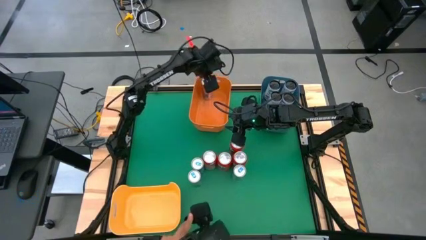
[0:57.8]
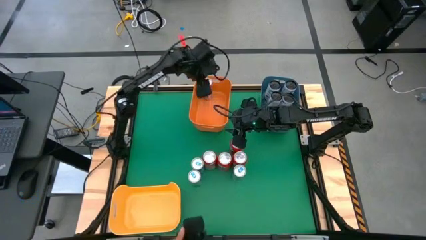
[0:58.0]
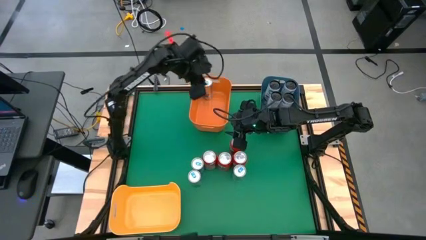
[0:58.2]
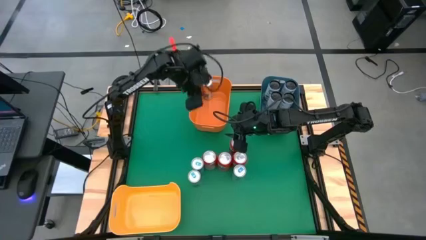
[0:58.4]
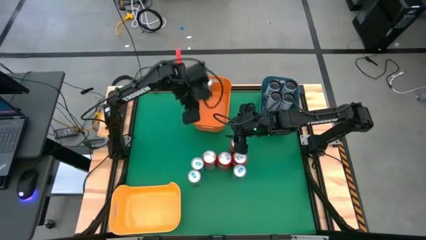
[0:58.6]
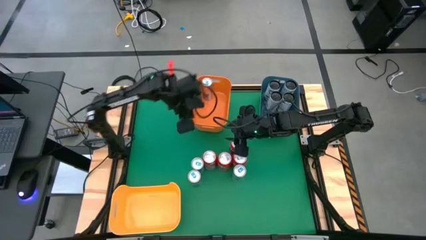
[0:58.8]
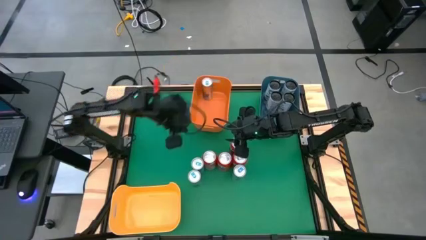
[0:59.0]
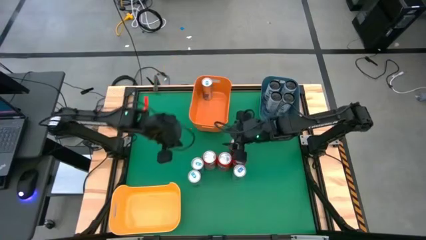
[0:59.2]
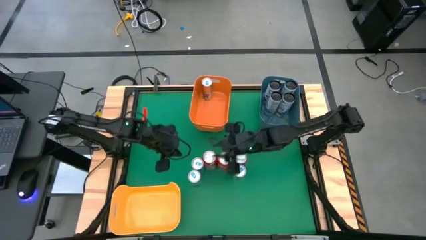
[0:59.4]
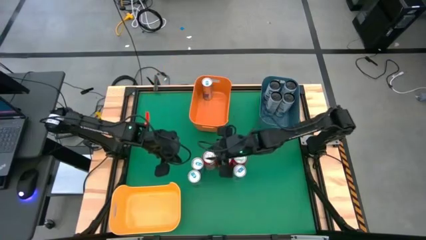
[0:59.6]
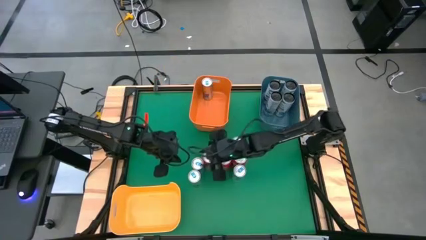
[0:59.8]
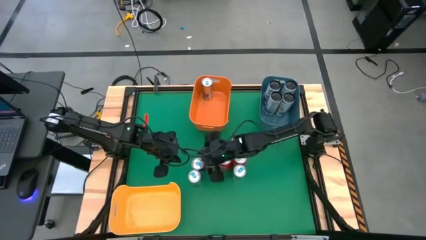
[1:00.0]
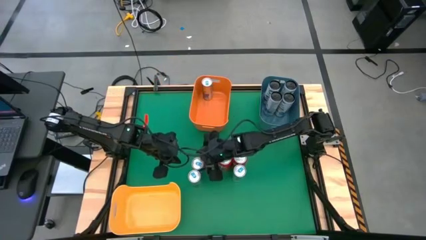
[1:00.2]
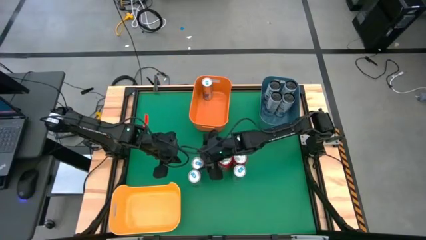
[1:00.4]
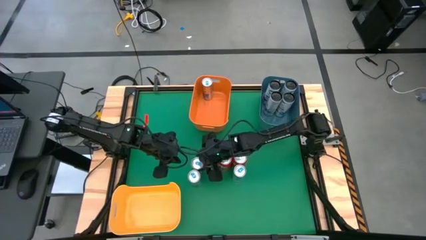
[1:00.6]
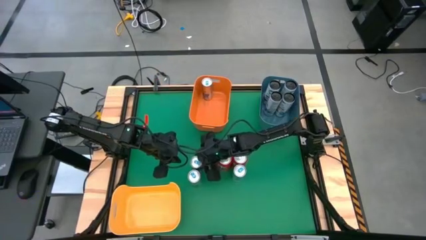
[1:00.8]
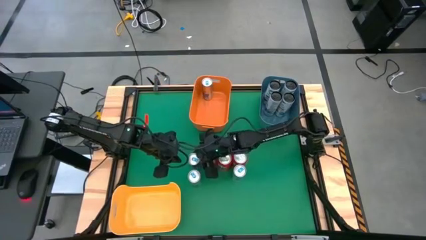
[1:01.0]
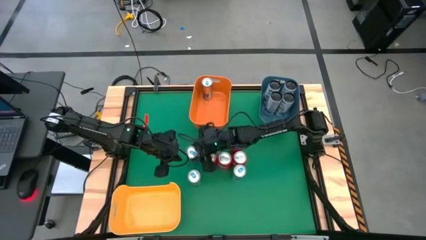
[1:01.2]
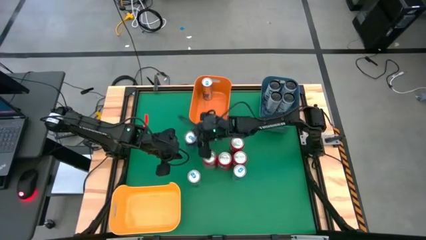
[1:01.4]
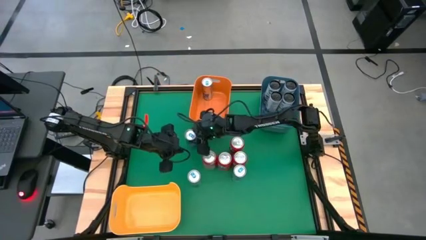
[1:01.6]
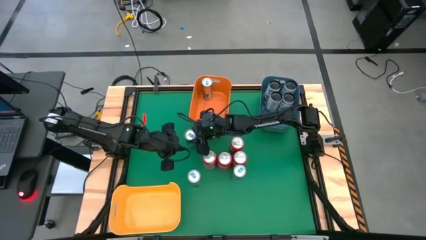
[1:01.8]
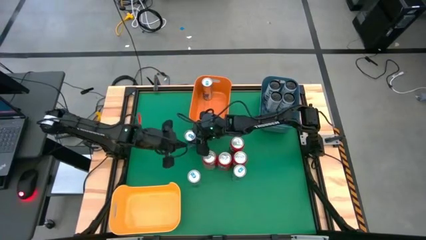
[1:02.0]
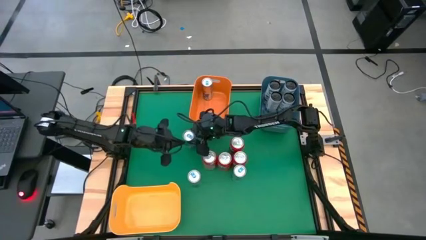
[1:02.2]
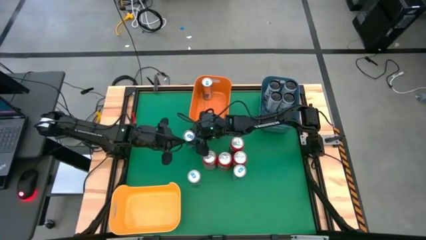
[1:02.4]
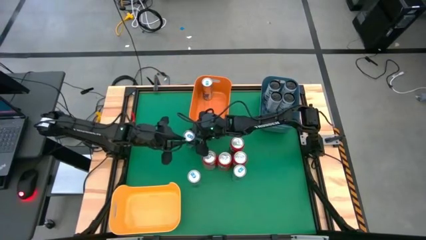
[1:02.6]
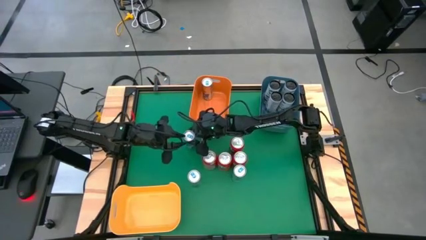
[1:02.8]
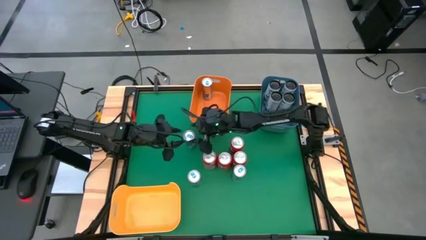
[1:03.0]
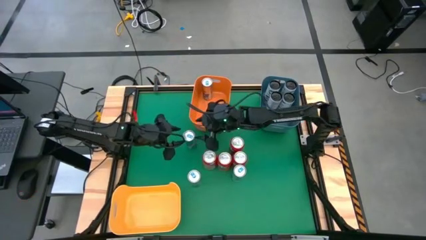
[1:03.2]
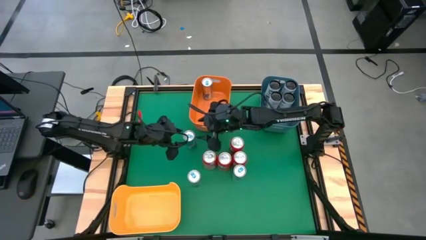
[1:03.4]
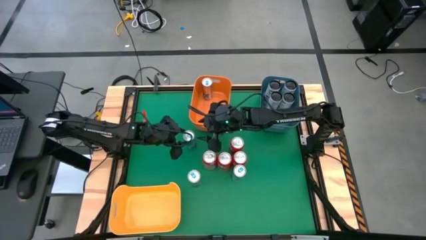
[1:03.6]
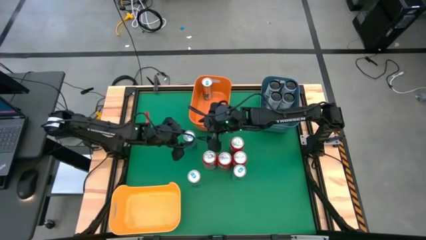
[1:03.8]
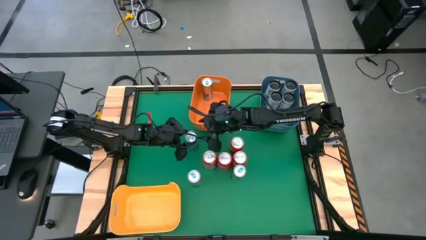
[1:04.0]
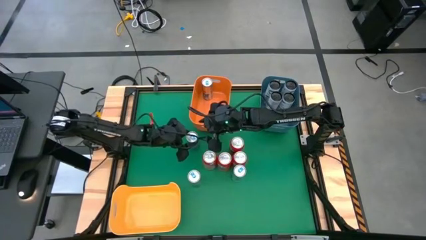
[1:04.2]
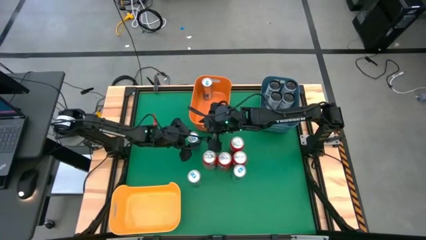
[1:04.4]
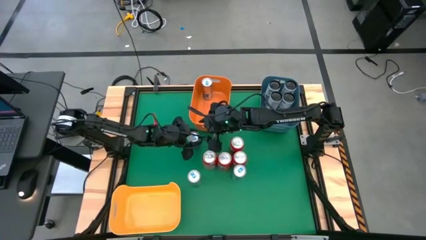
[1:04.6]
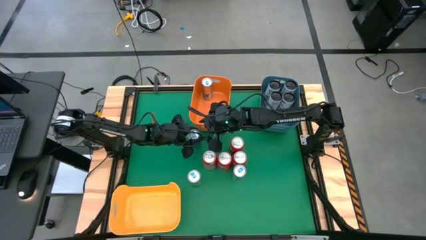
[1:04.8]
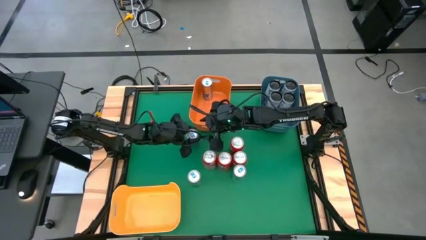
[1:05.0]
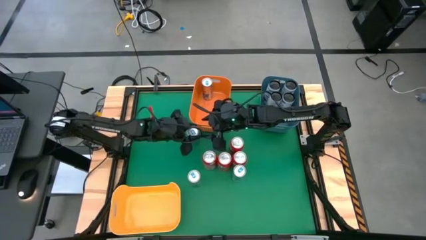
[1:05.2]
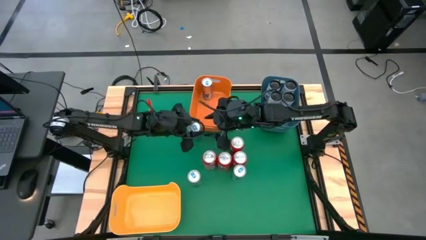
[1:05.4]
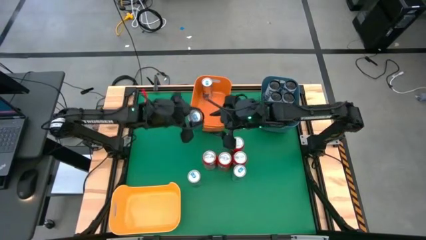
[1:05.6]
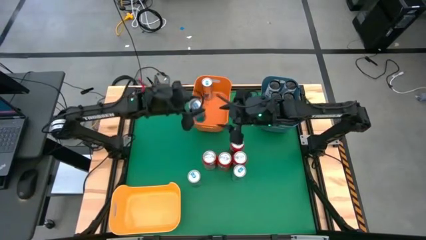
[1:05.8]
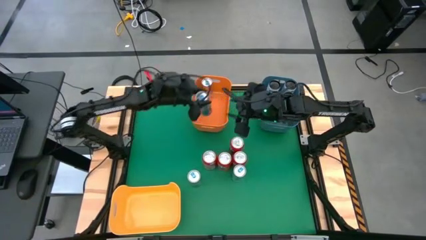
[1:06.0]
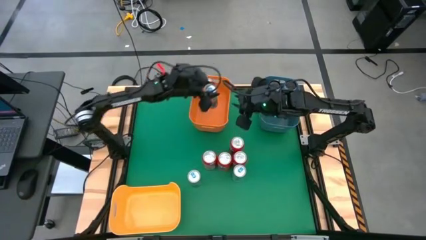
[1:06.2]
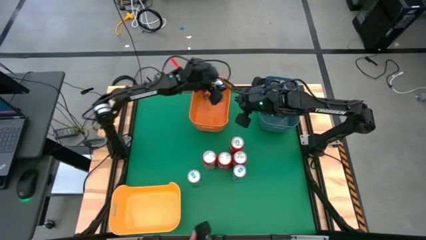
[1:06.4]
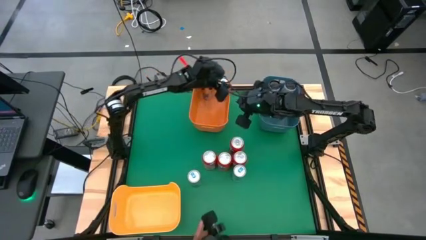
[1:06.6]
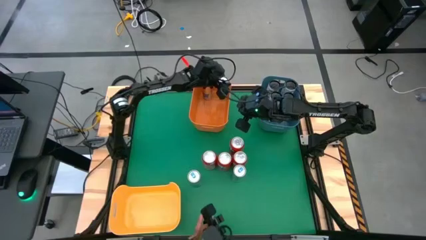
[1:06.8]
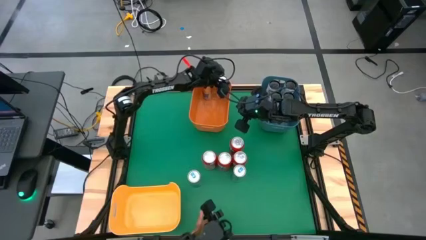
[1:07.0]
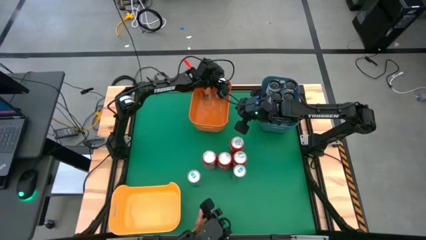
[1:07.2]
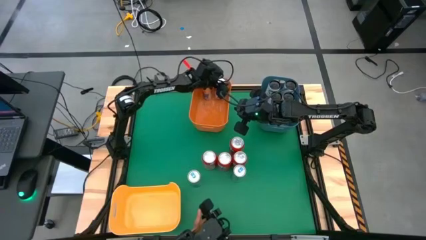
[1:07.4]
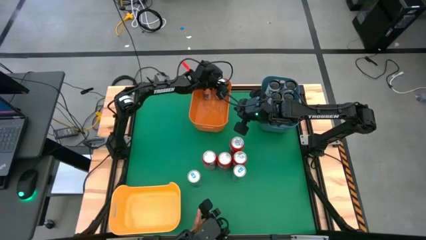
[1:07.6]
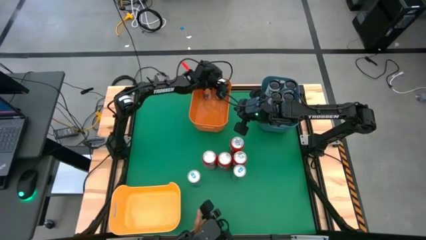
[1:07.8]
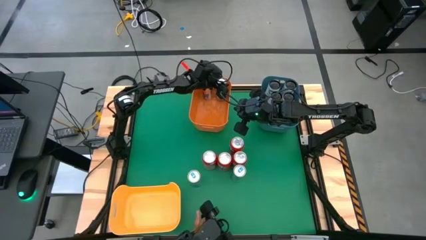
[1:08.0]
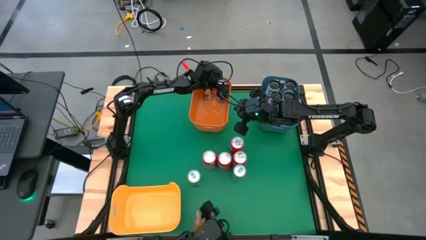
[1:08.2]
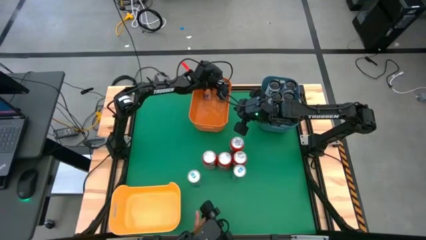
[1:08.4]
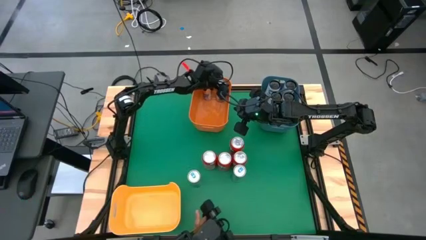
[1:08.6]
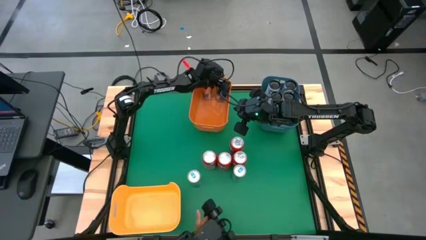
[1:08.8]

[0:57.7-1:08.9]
Task: Sort soda cans
Put the blue soda can into the orange bin

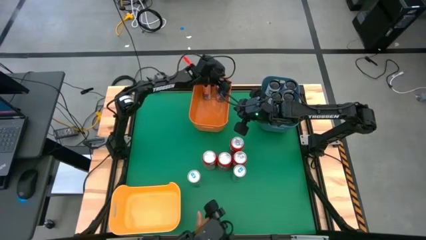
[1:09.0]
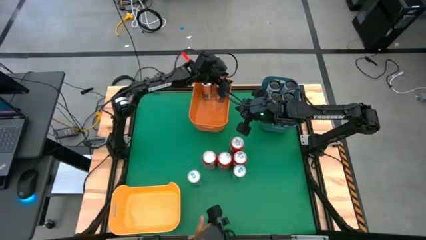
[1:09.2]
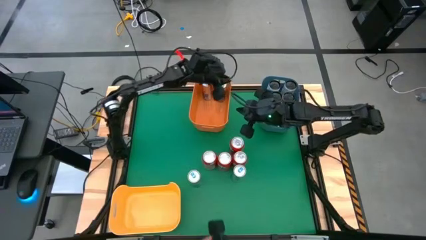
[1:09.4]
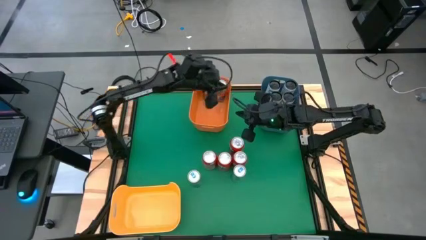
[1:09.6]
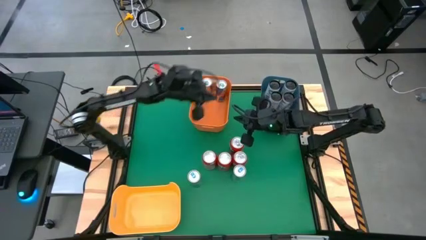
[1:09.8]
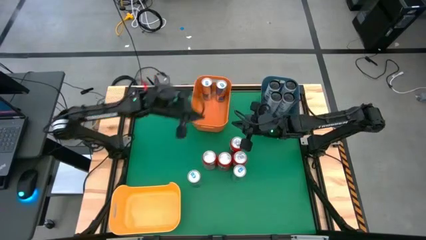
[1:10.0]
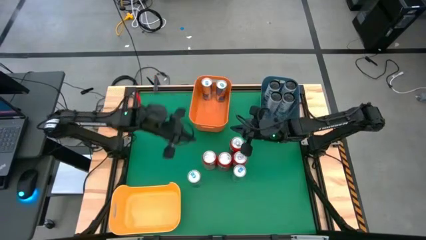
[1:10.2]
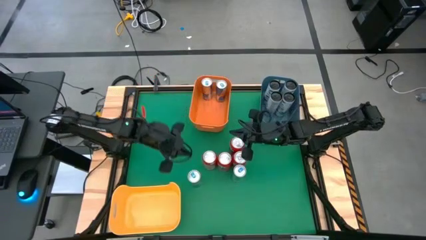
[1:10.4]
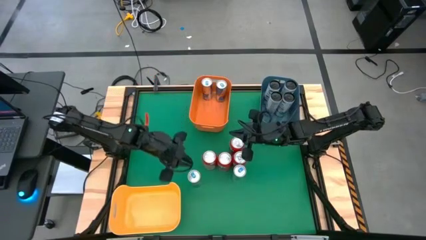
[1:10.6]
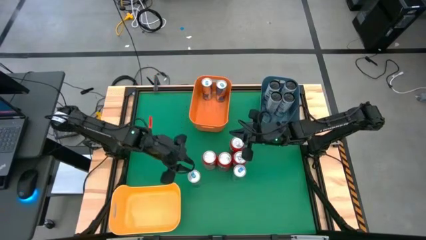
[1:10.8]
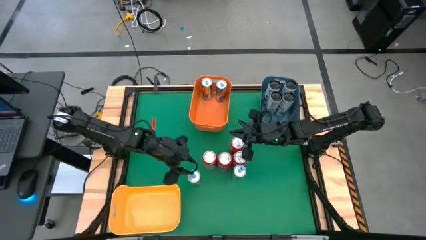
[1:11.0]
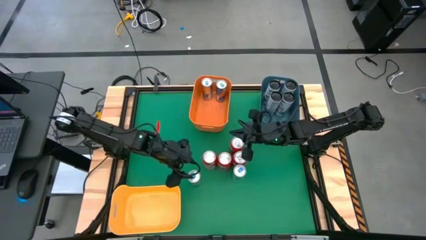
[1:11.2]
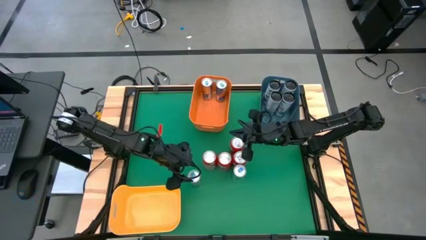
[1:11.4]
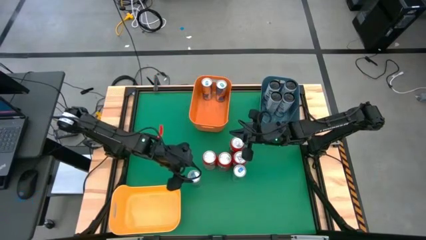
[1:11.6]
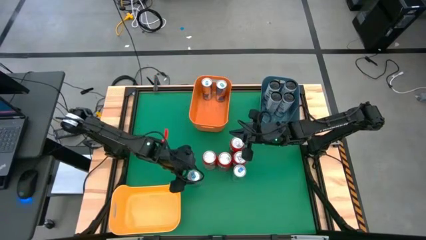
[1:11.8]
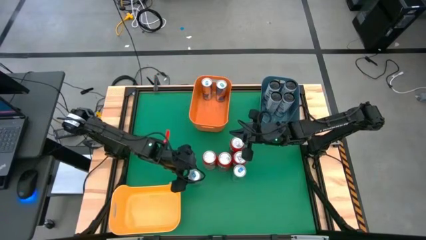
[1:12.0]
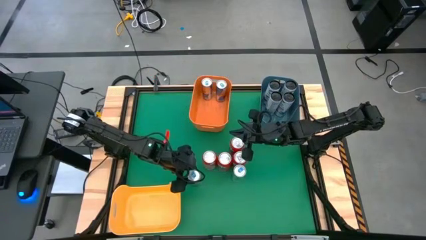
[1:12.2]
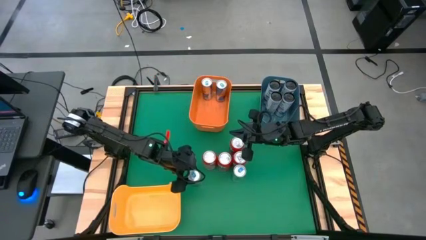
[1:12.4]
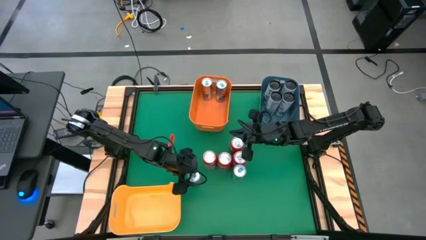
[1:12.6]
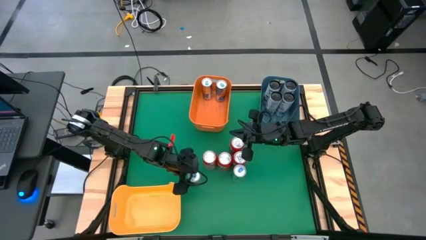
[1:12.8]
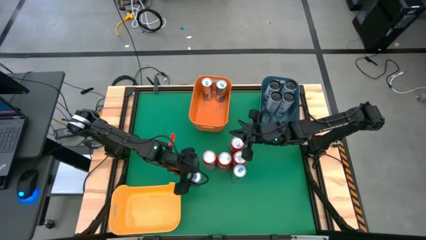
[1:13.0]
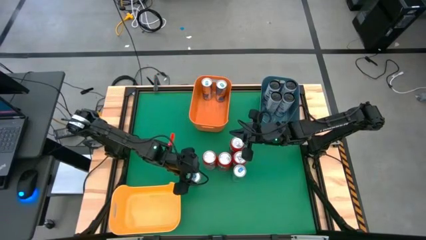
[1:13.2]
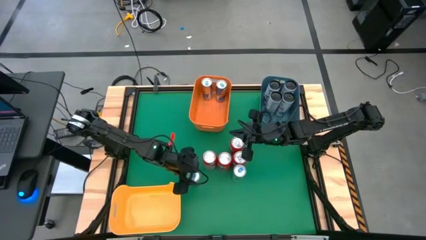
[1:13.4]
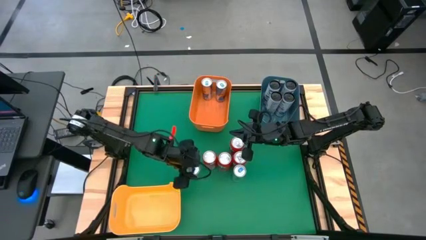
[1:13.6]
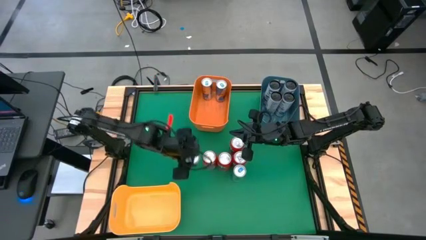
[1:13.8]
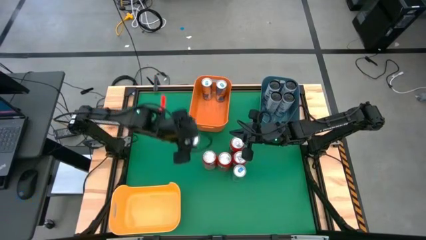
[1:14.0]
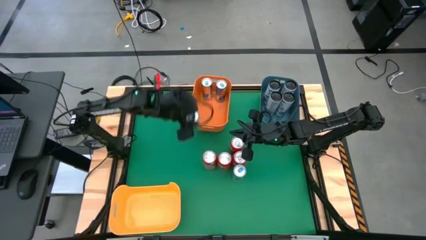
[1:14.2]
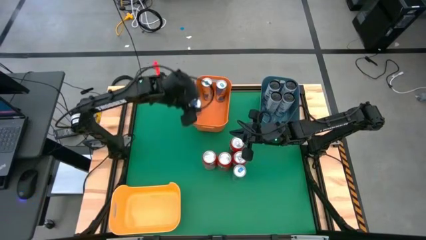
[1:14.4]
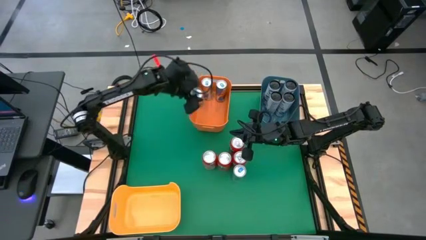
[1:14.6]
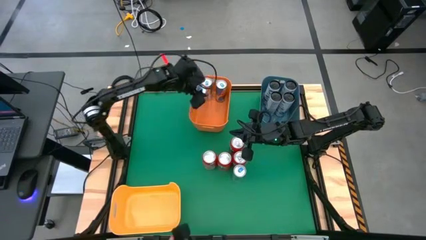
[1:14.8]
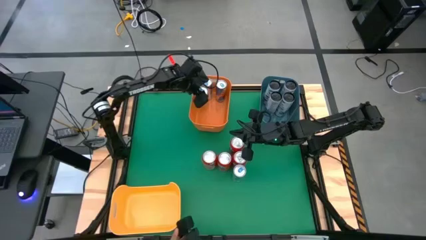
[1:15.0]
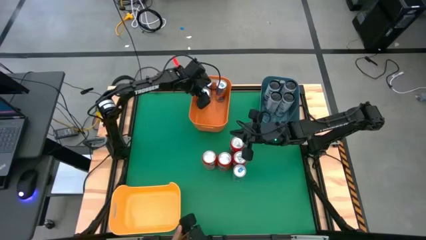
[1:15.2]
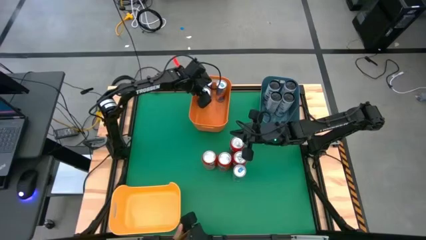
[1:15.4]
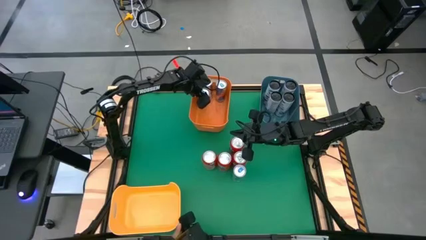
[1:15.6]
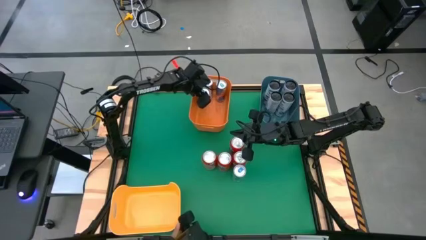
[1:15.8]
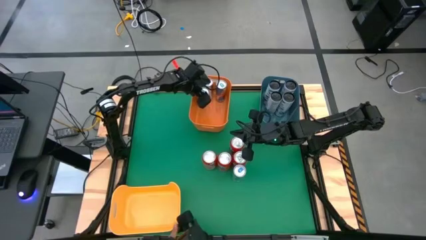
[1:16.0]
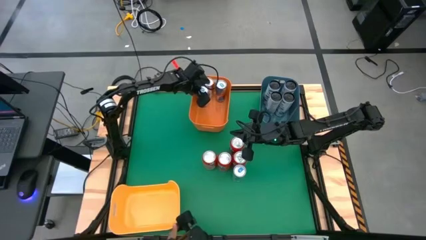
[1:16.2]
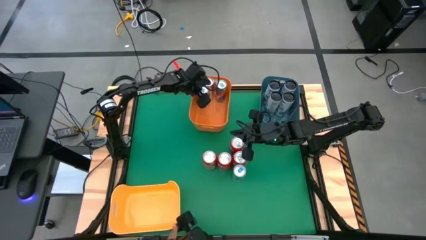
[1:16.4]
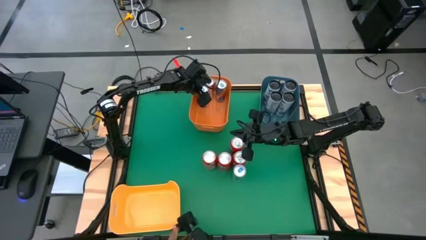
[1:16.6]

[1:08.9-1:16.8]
Put the blue soda can into the orange bin
